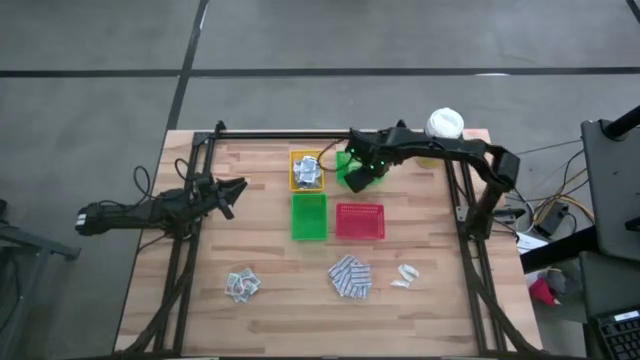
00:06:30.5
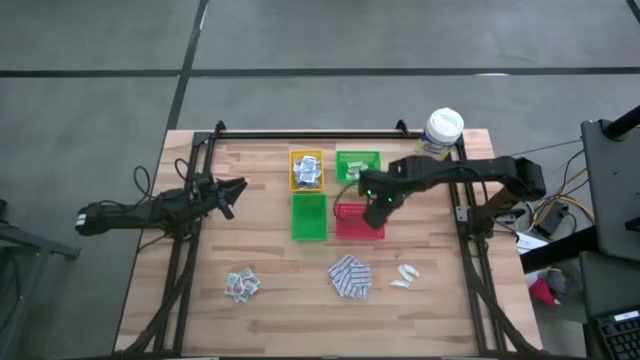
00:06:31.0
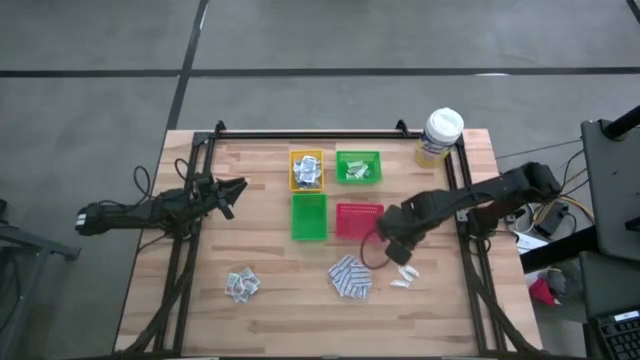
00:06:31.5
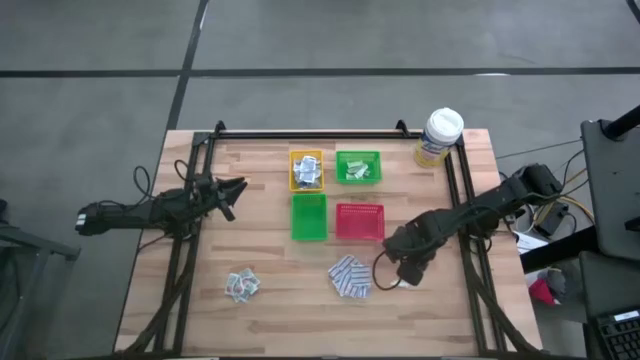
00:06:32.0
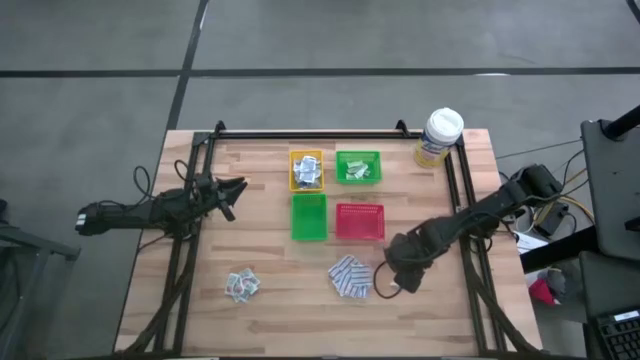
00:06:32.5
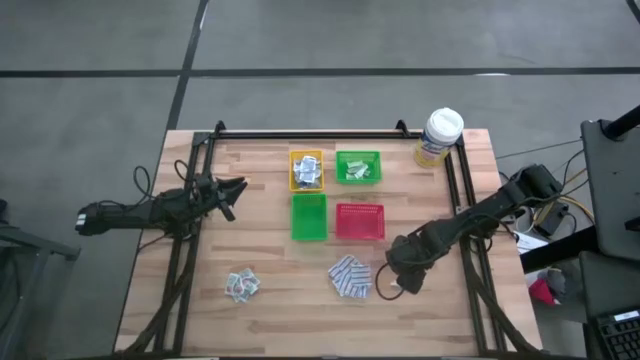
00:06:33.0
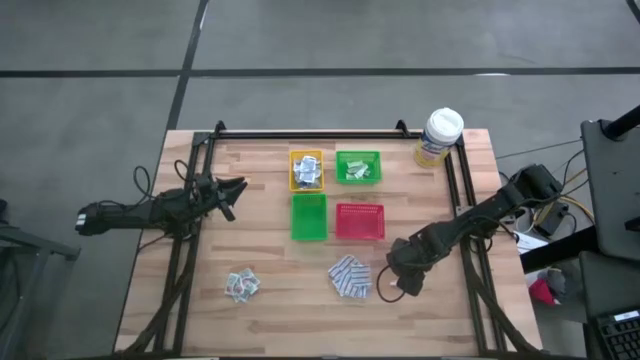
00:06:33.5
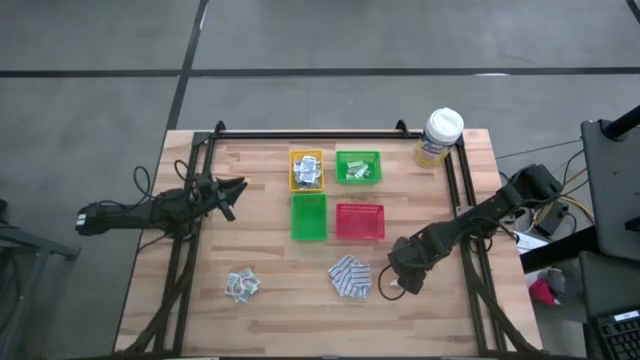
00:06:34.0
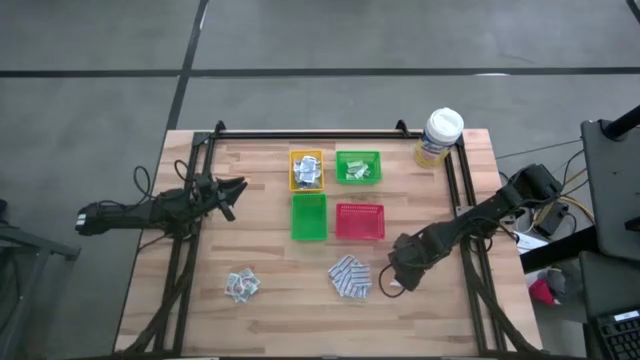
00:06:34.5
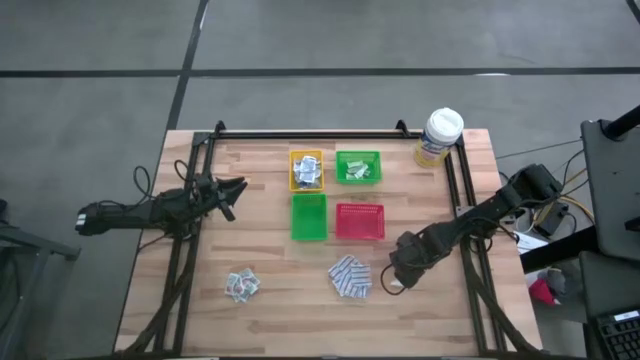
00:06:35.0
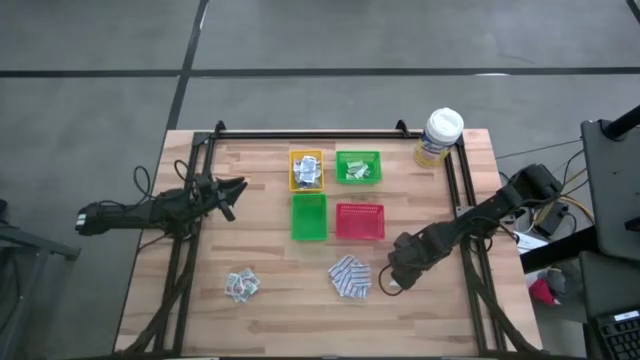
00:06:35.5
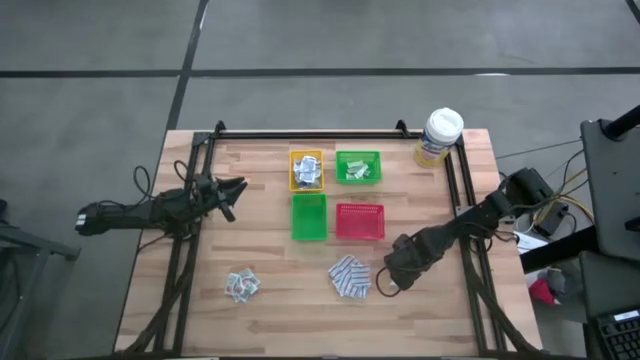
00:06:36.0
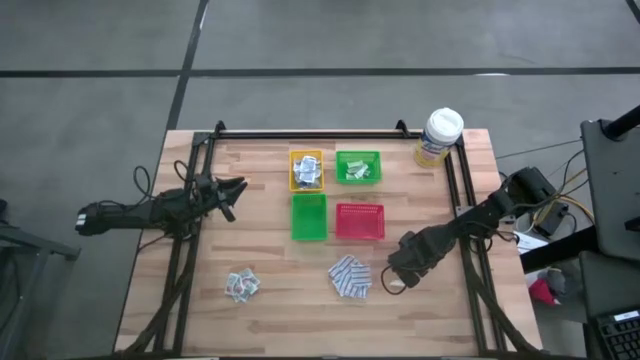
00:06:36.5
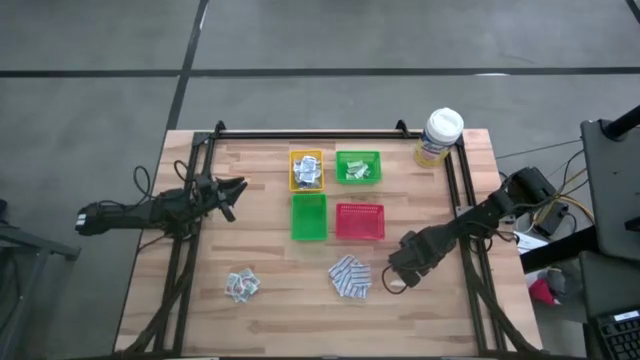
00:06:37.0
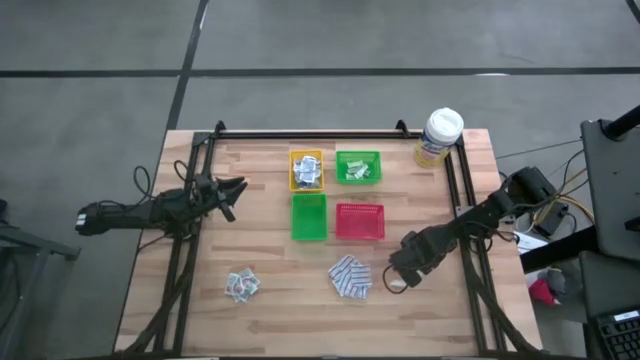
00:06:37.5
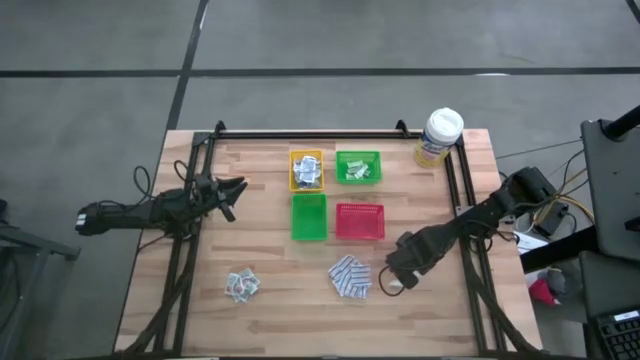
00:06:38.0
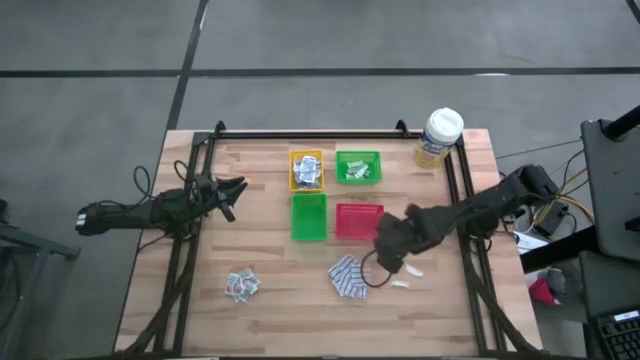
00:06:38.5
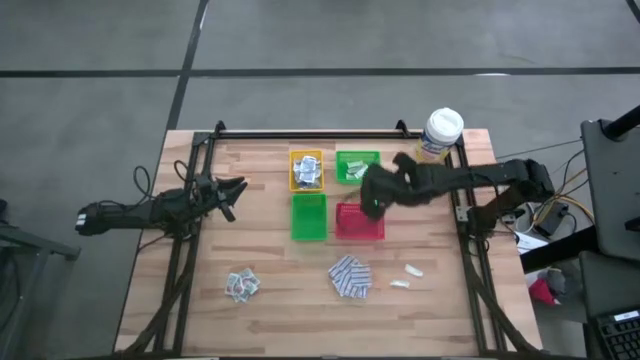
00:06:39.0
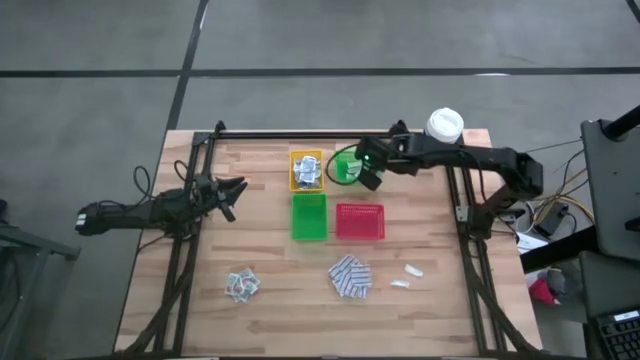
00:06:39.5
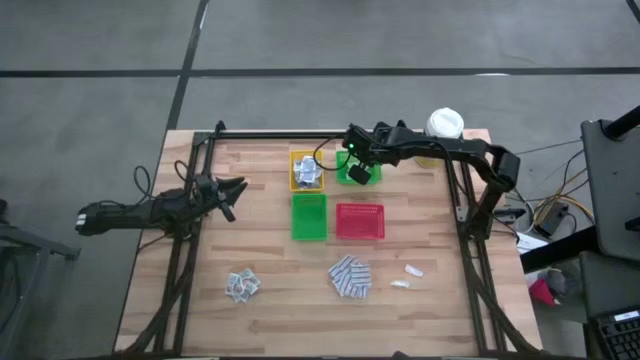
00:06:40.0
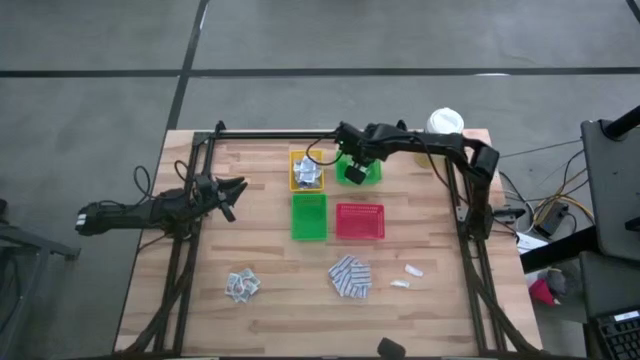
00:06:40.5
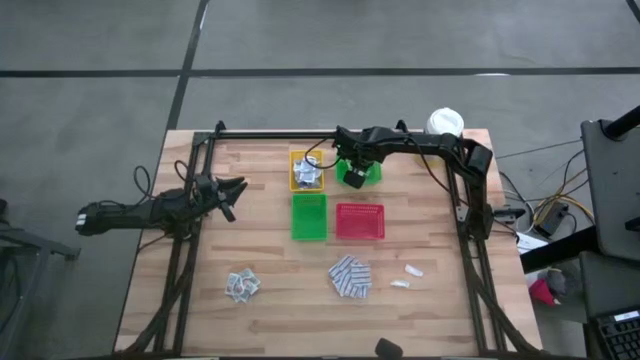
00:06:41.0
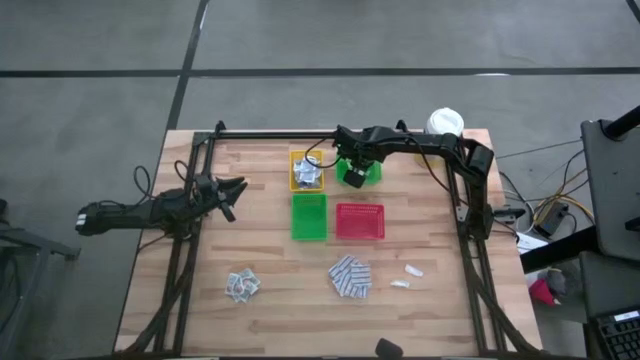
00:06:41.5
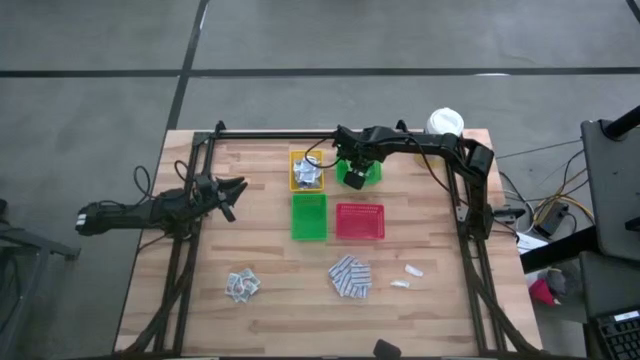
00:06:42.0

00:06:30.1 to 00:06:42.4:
Task: Pick & Place First Aid Supplies
Put the green bandage pack into the top green bin

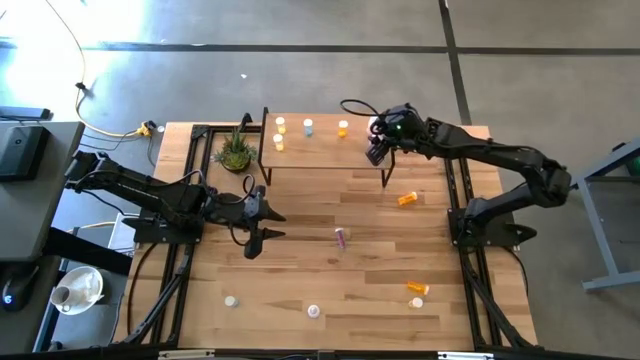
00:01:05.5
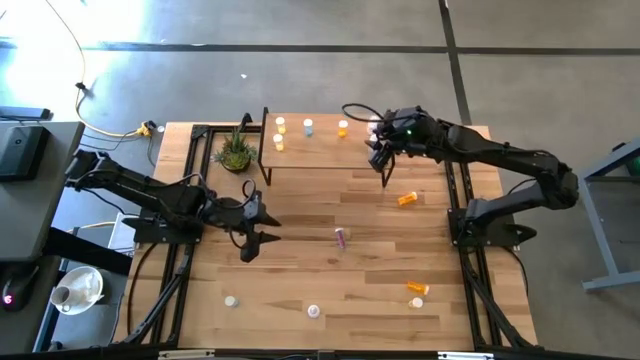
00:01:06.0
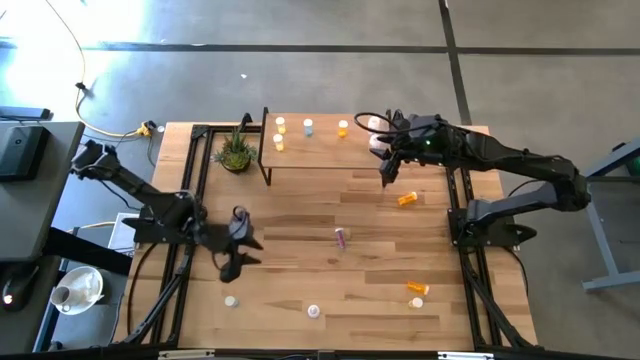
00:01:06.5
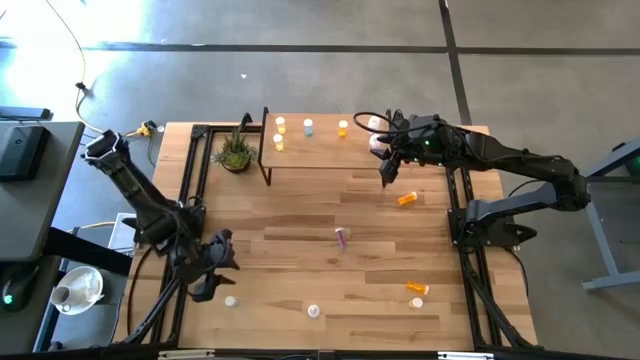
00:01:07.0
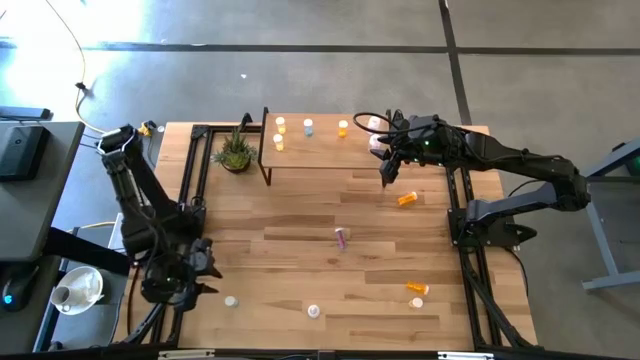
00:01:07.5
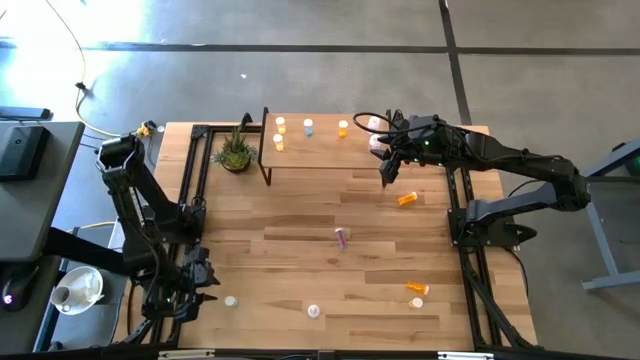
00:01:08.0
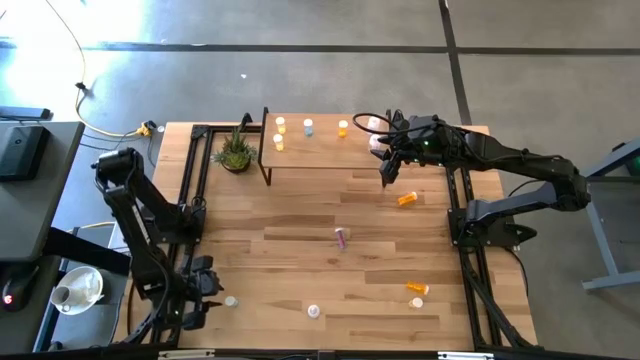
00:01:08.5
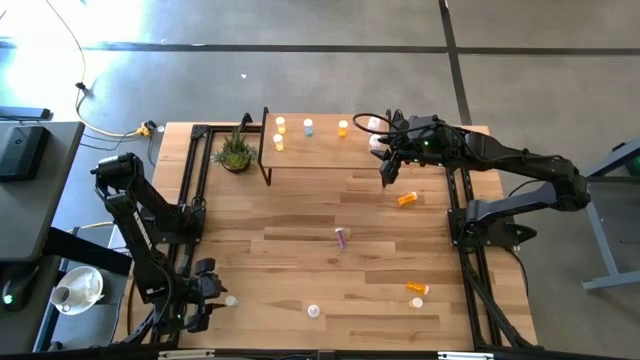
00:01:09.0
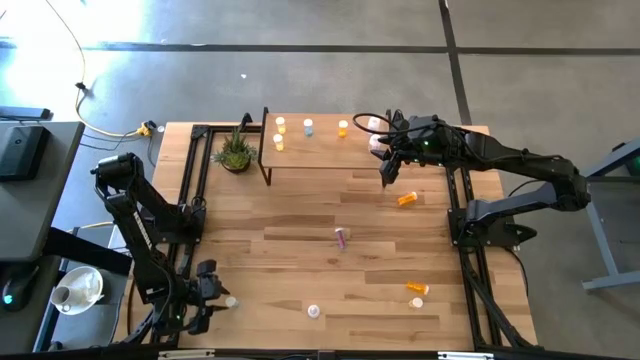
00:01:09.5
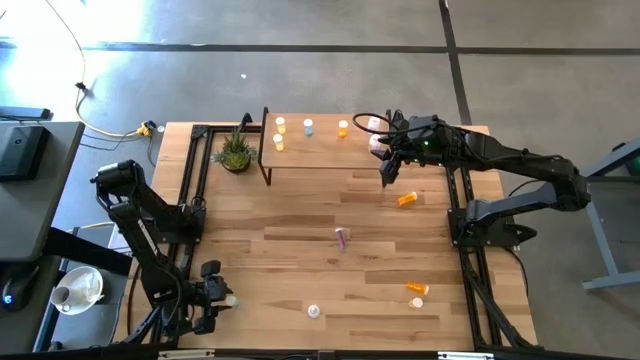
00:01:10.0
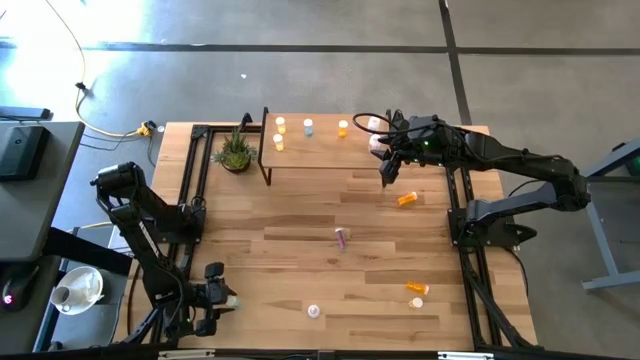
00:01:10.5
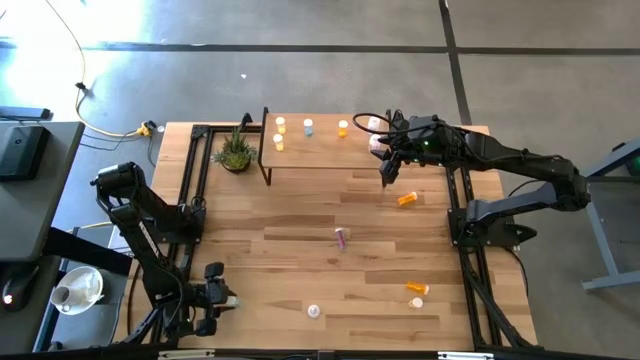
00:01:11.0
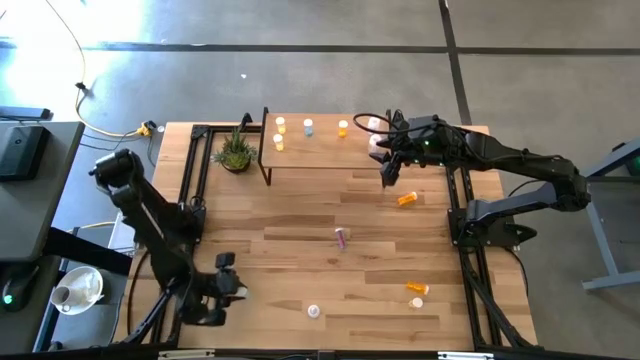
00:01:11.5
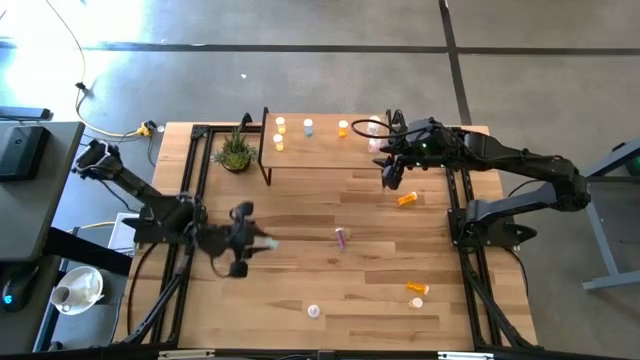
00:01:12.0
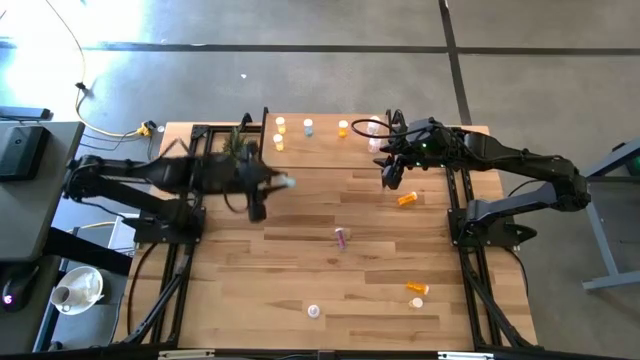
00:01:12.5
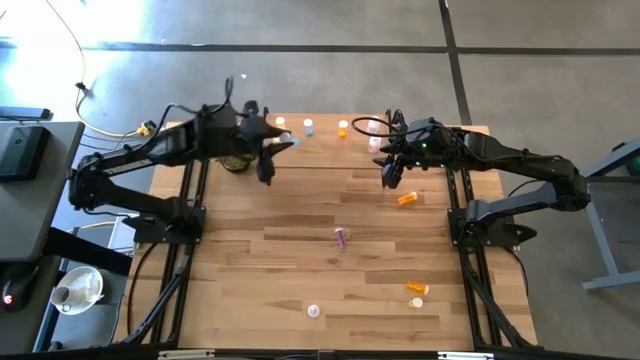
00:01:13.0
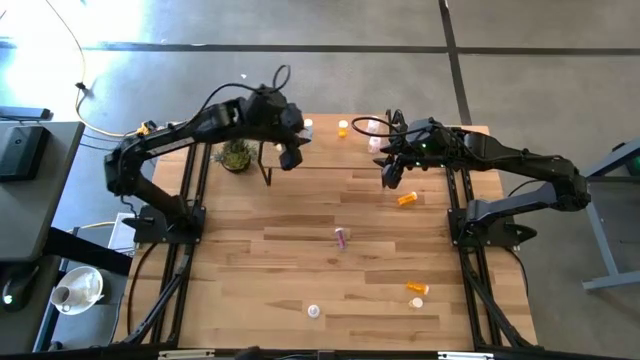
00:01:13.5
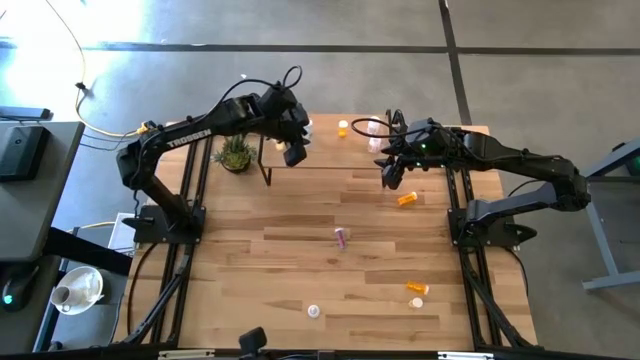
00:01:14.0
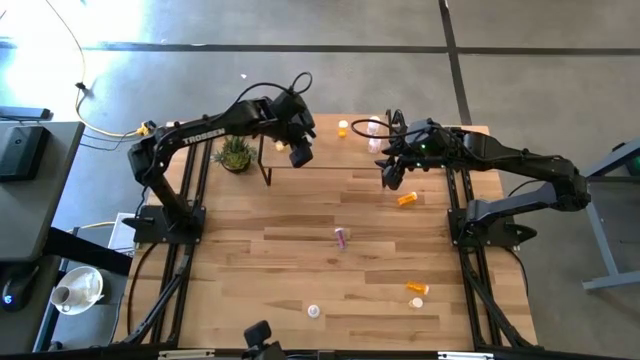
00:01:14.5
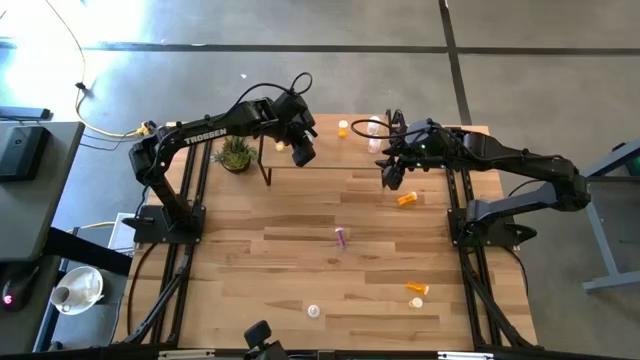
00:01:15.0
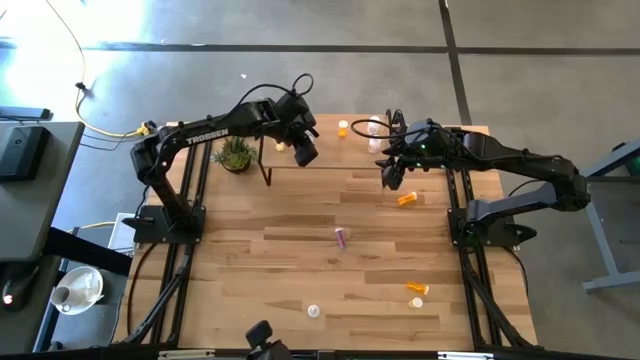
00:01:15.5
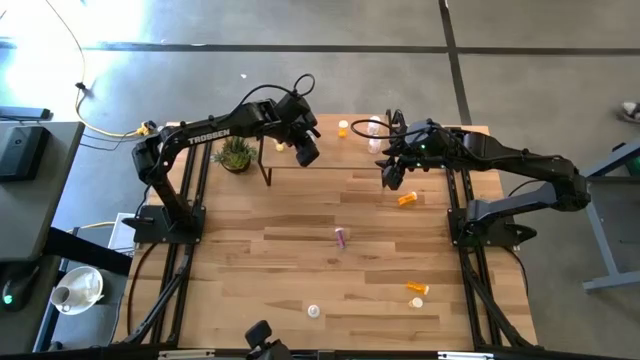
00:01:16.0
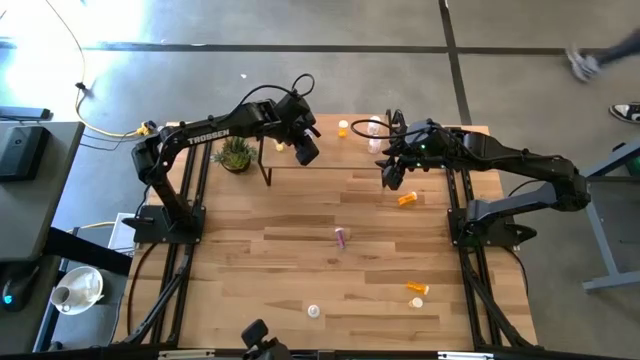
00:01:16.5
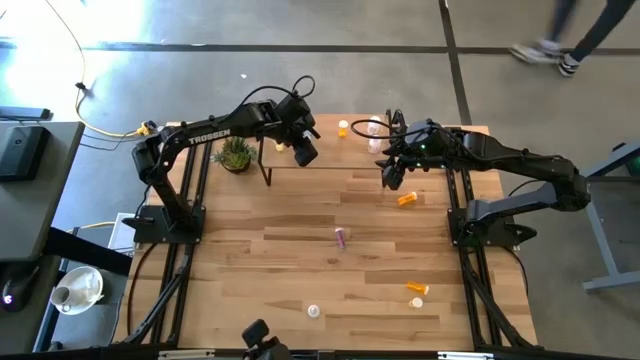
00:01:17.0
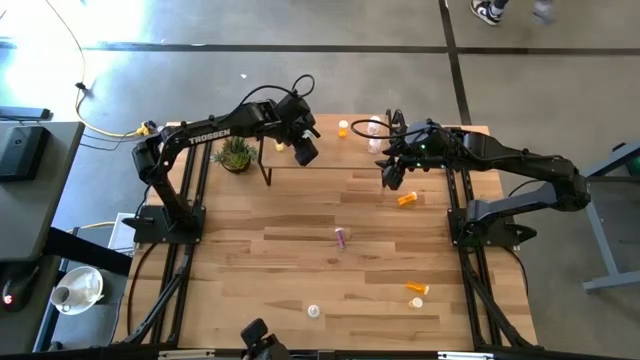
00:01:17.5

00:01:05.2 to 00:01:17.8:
Task: Pick and place medicine bottles onto shelf by color
Put the bottom blue pill bottle on the shelf aligned with the other blue pill bottle
